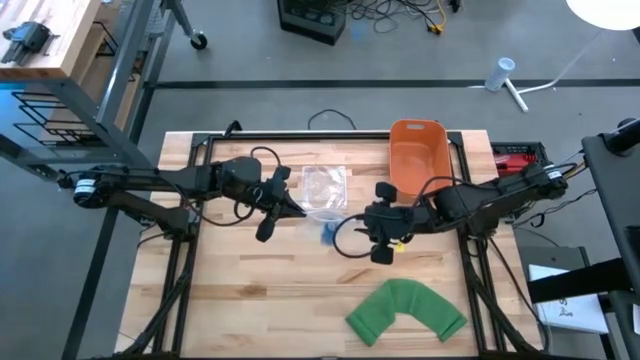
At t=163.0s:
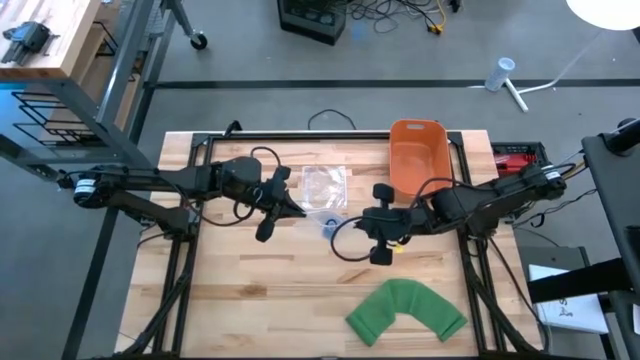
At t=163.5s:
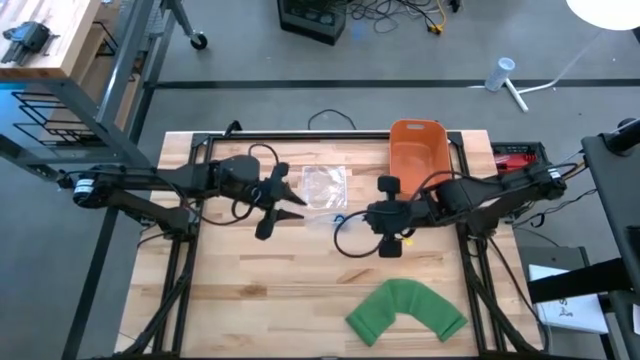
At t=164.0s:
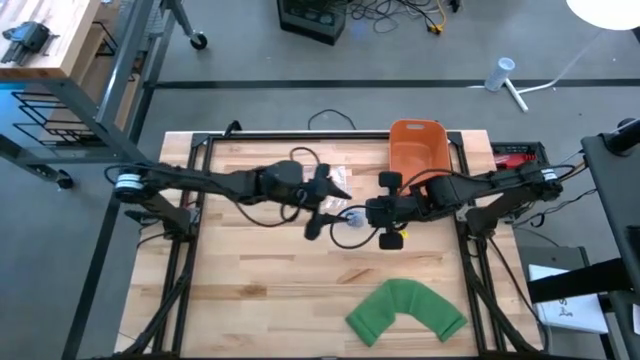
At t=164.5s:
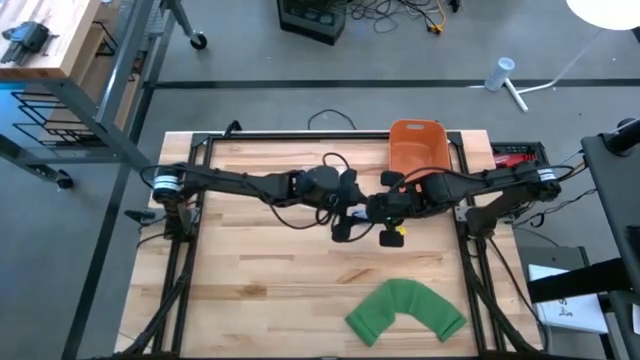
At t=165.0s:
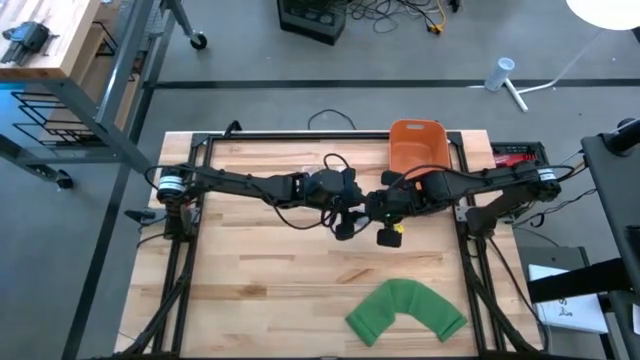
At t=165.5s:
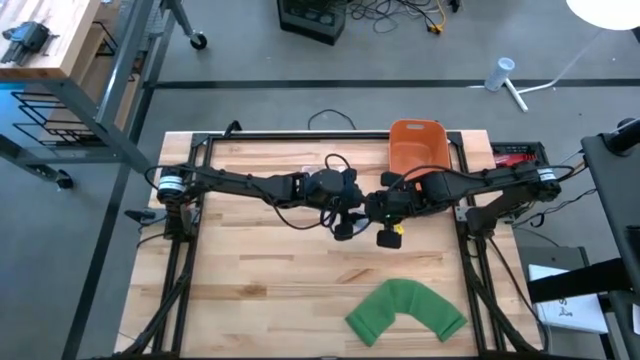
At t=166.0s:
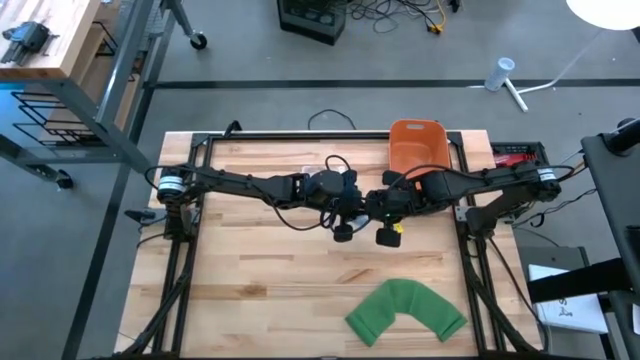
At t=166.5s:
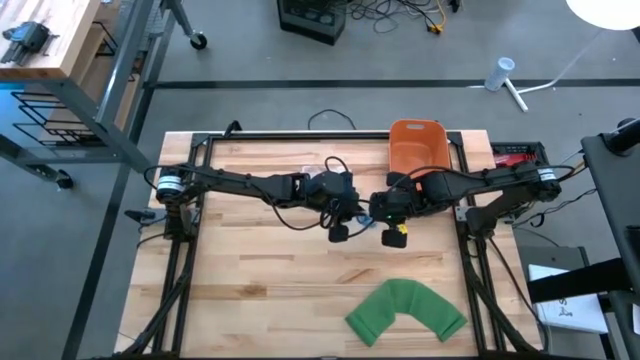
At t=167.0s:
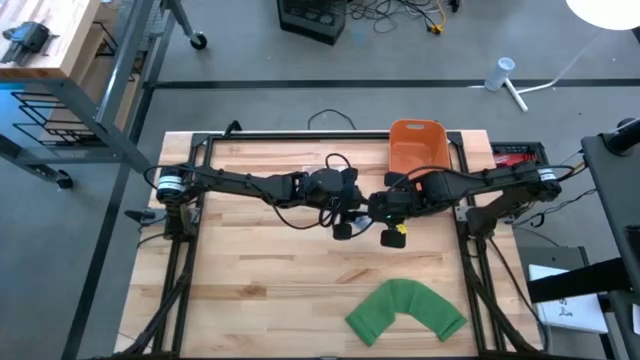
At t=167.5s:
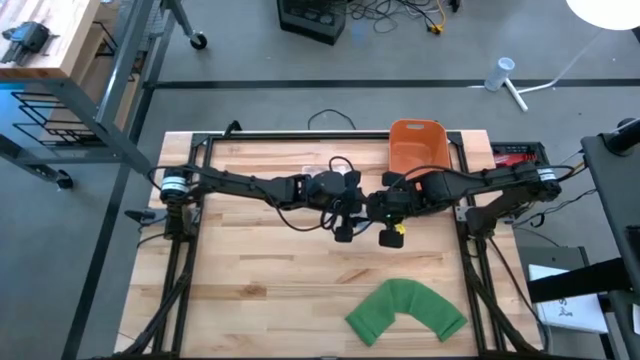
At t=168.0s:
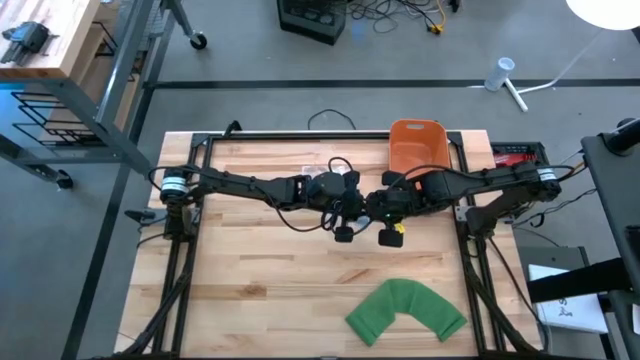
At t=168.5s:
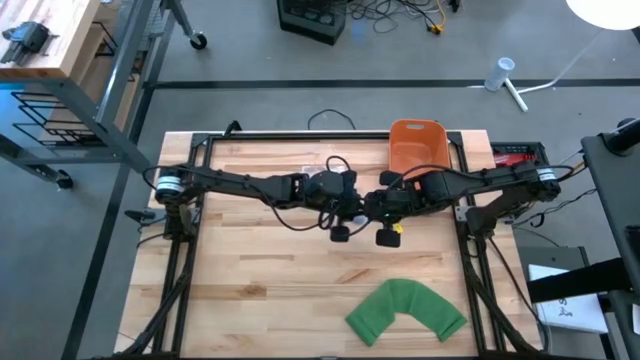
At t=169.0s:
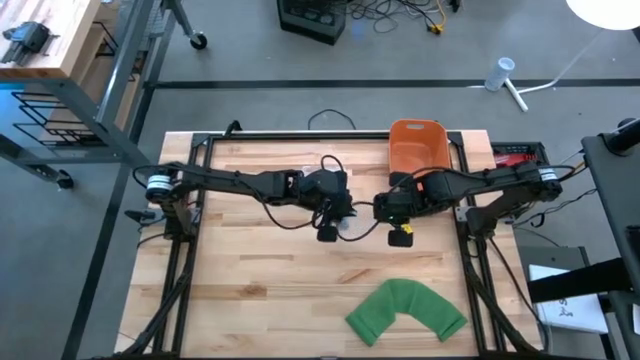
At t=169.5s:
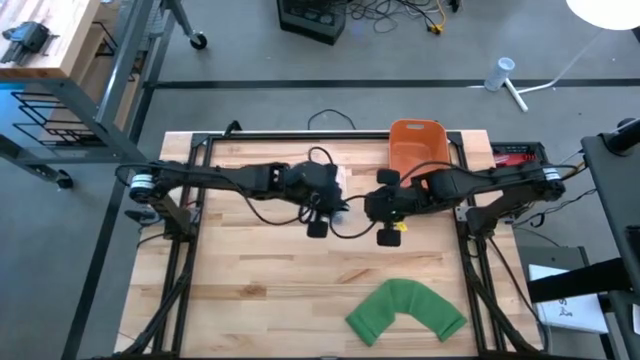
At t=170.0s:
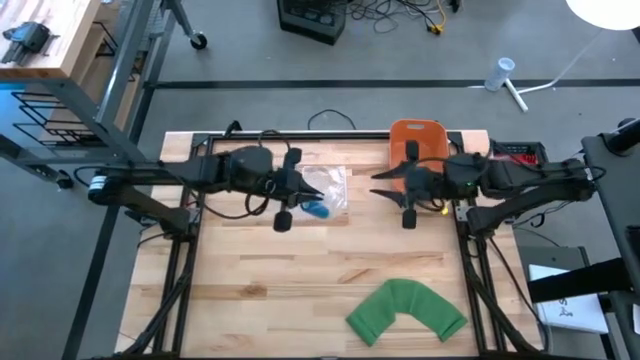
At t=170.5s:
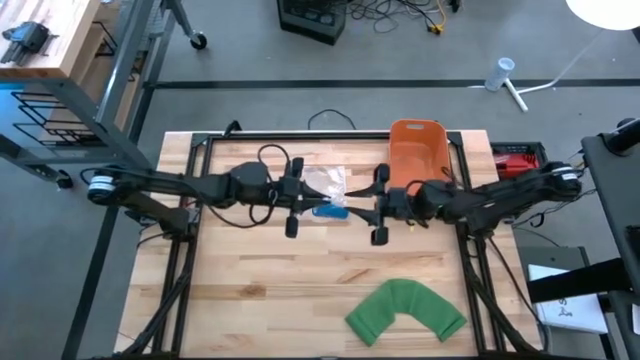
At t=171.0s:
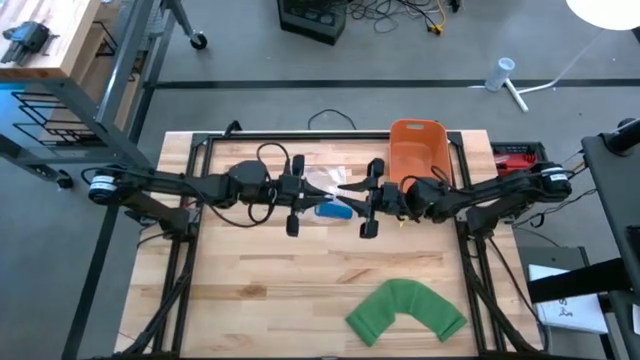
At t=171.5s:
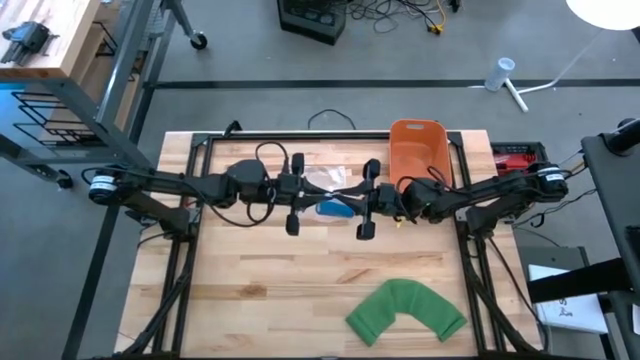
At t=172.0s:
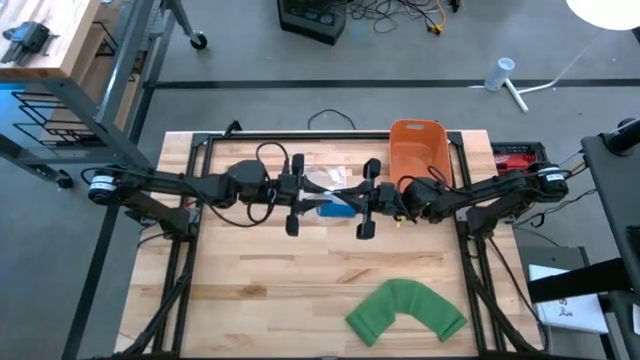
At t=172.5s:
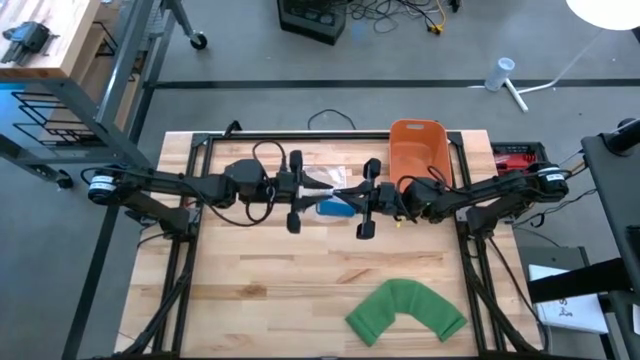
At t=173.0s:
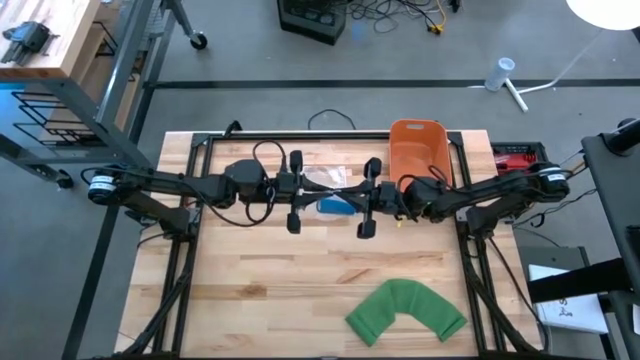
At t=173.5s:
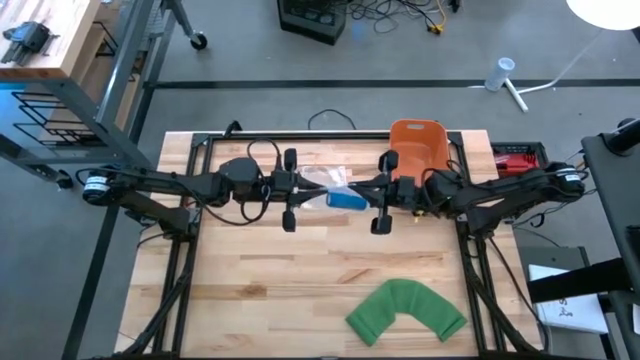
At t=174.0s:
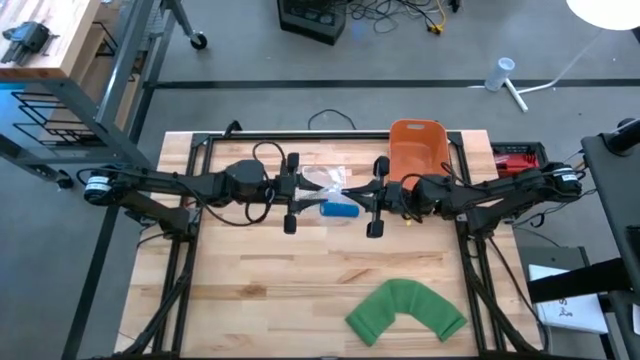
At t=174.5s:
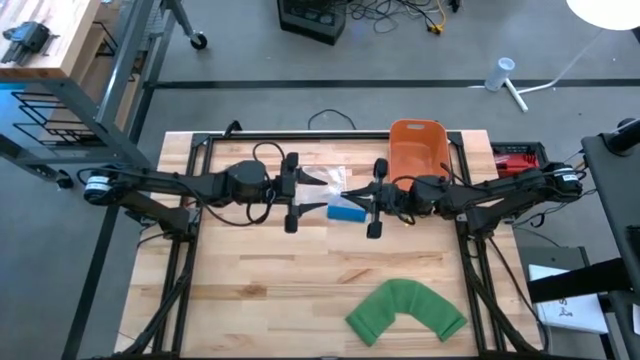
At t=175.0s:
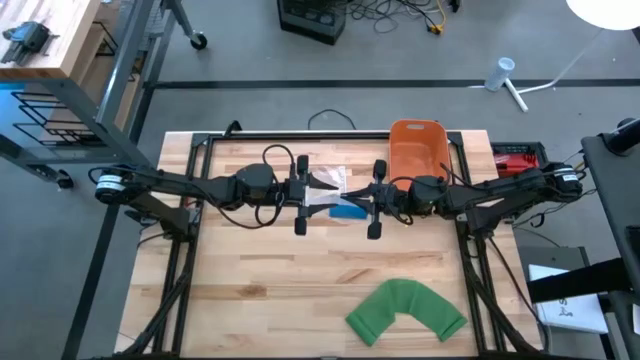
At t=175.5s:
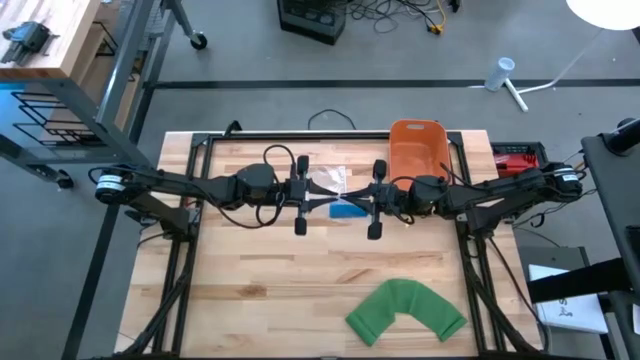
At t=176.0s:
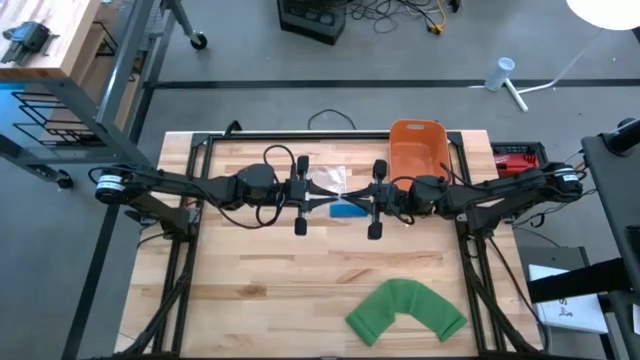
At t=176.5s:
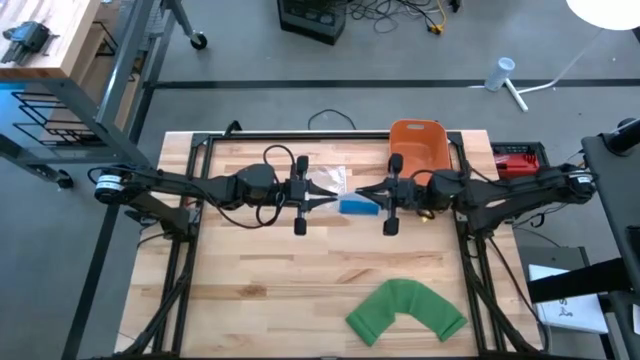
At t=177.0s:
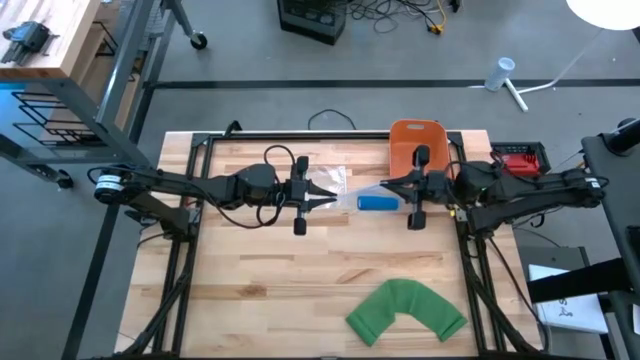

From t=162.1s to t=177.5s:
Task: Roll bandage
Close the left transparent zip bag

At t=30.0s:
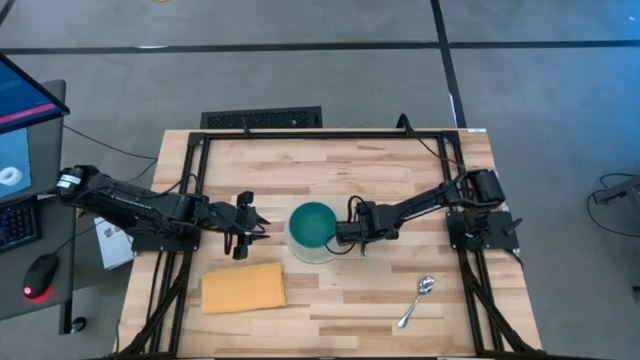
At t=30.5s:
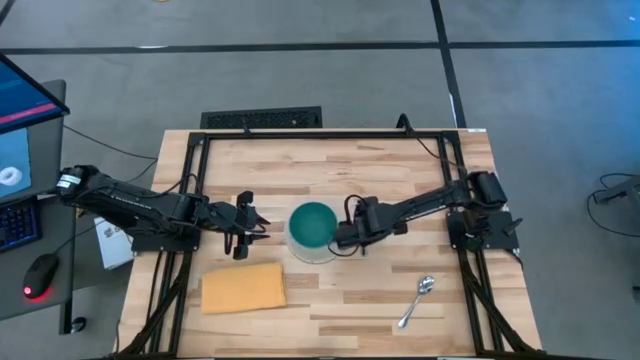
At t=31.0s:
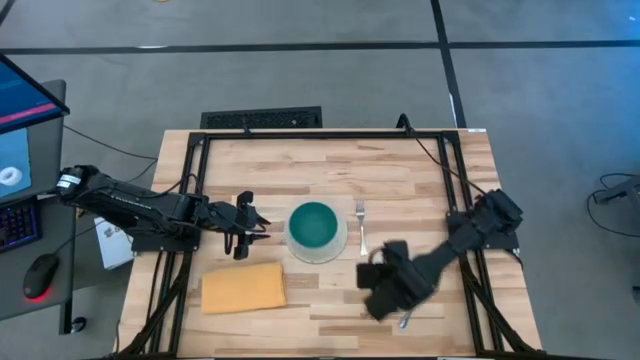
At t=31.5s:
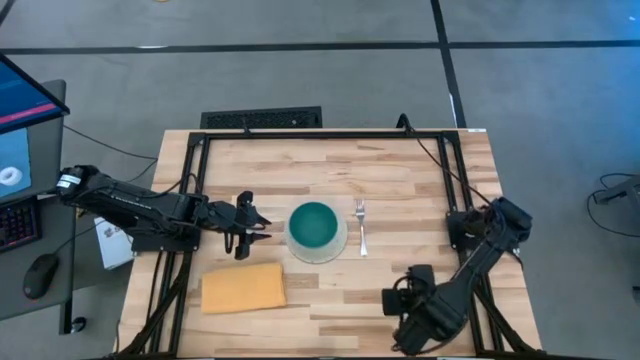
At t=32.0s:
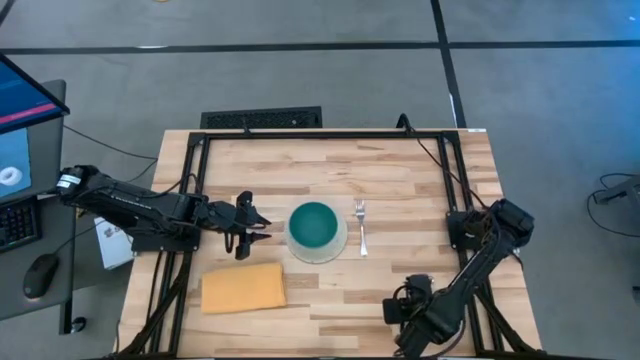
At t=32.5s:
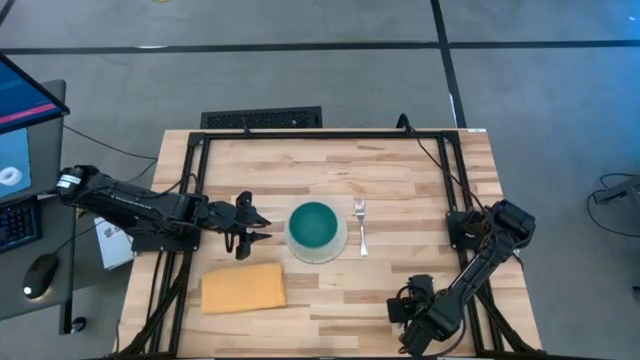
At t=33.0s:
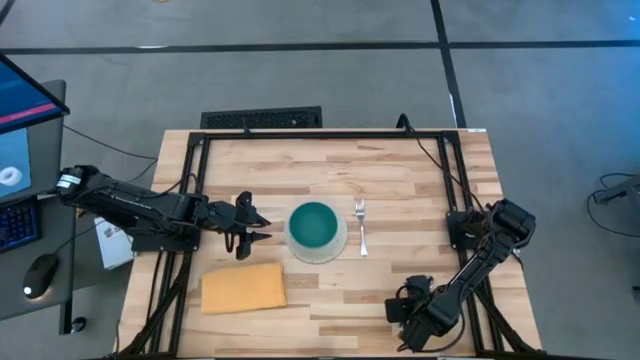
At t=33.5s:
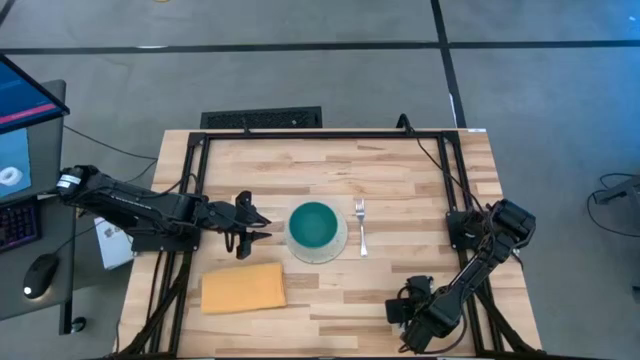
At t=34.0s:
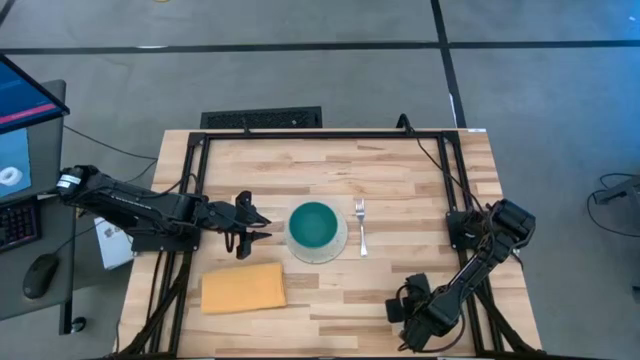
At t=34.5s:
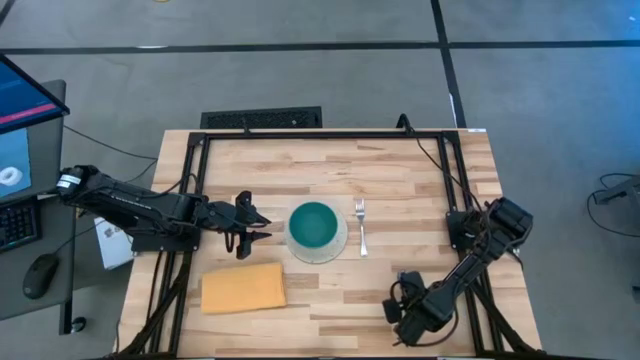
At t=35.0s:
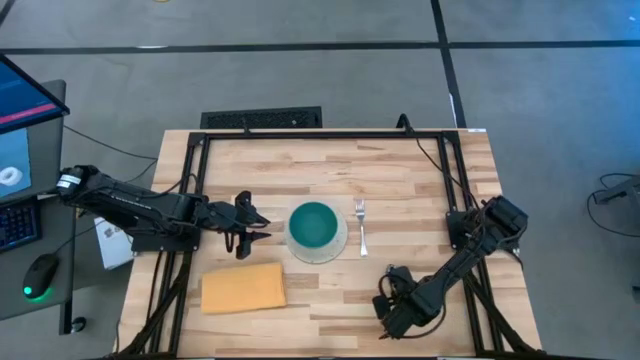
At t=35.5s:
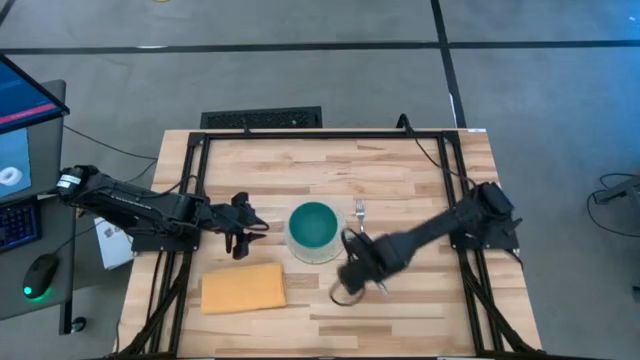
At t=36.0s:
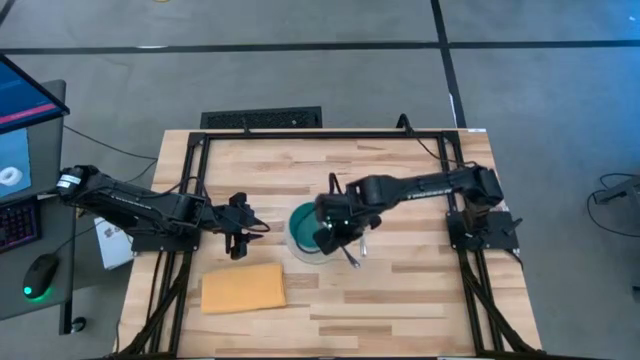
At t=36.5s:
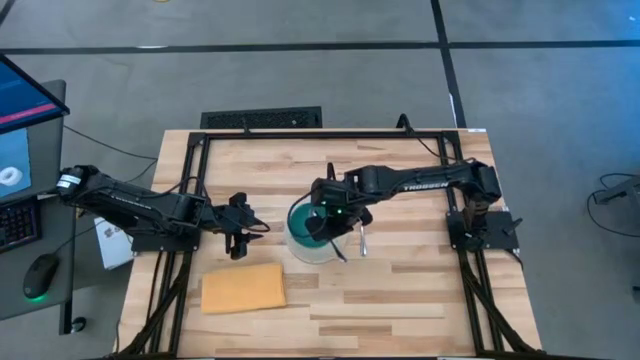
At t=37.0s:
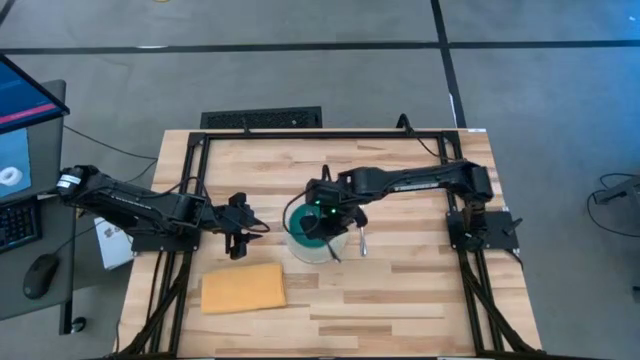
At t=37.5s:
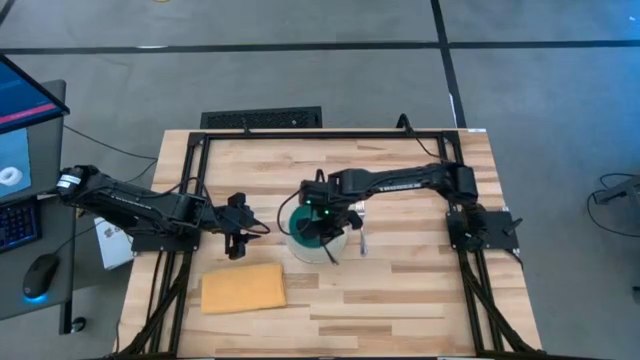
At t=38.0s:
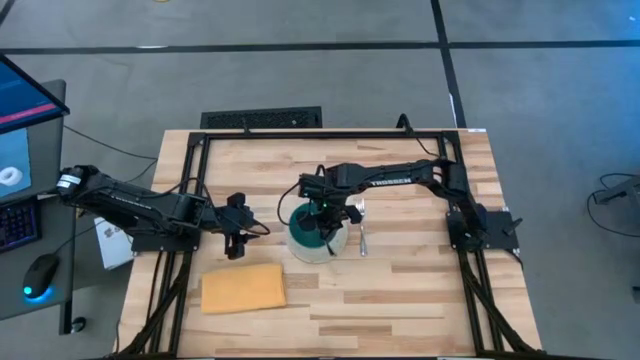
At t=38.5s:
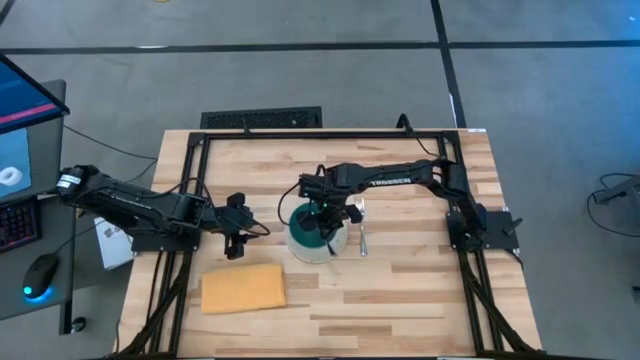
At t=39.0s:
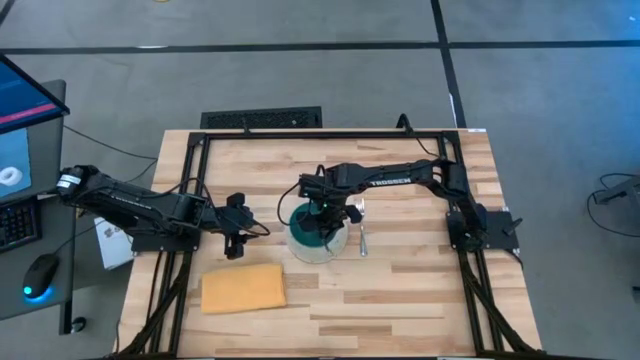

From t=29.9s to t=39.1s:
Task: Set table place
Put the spoon into the bowl
